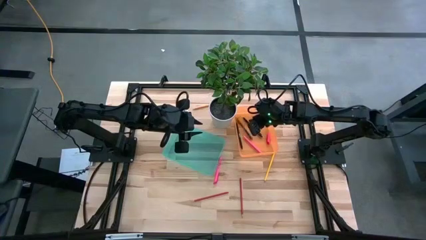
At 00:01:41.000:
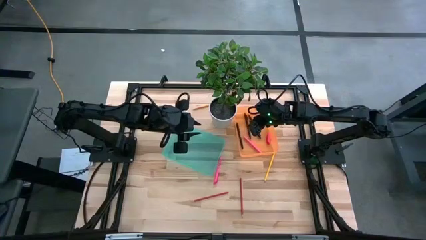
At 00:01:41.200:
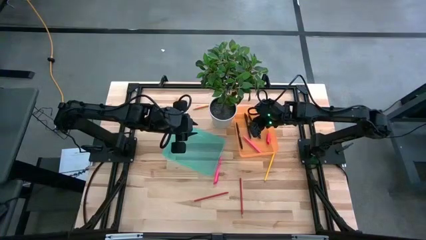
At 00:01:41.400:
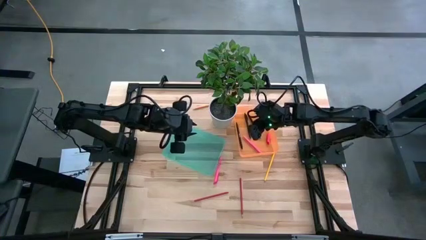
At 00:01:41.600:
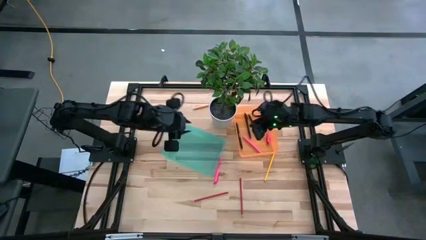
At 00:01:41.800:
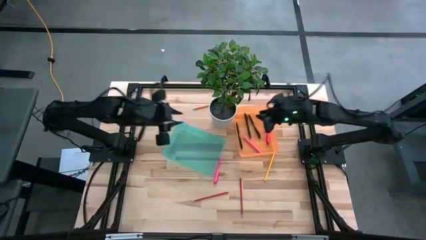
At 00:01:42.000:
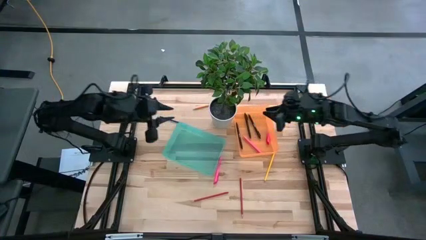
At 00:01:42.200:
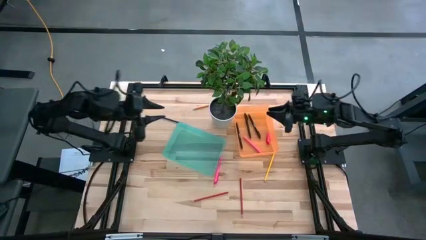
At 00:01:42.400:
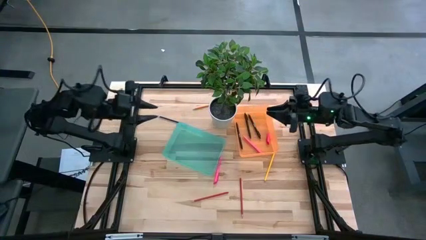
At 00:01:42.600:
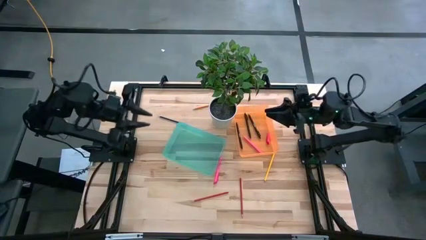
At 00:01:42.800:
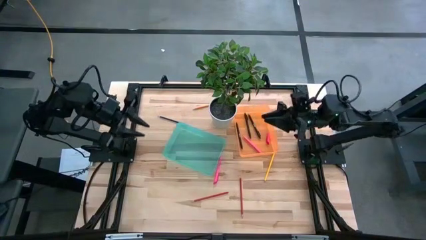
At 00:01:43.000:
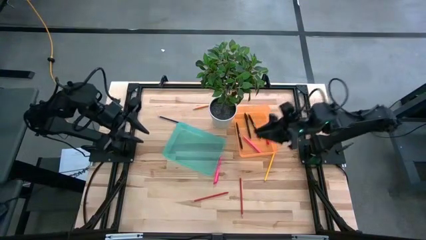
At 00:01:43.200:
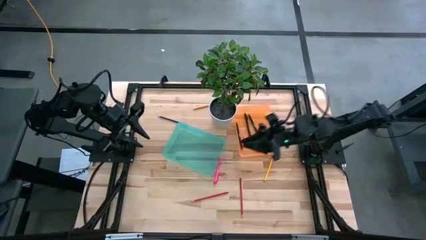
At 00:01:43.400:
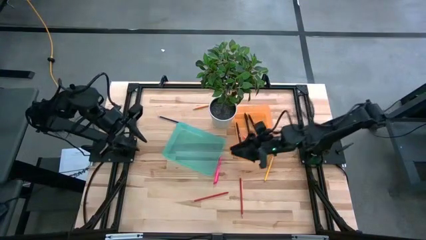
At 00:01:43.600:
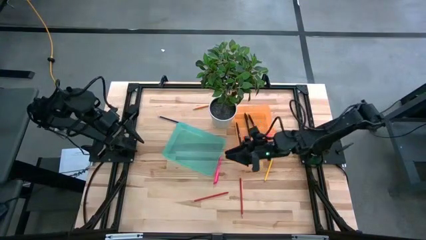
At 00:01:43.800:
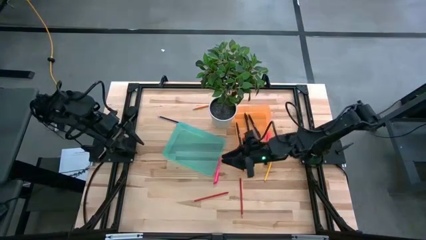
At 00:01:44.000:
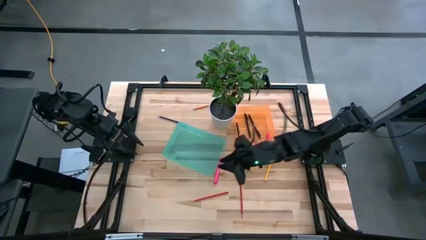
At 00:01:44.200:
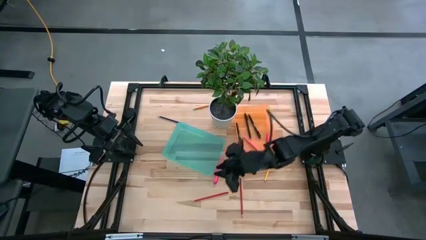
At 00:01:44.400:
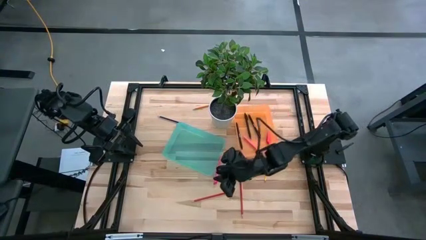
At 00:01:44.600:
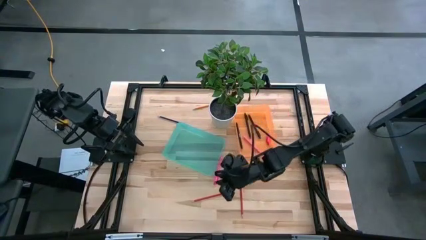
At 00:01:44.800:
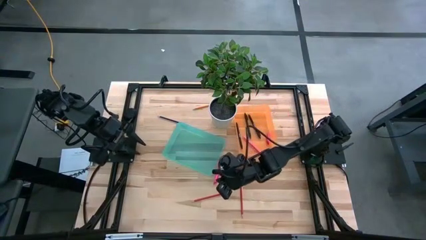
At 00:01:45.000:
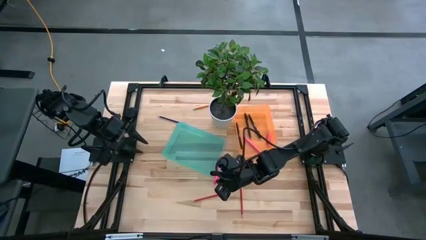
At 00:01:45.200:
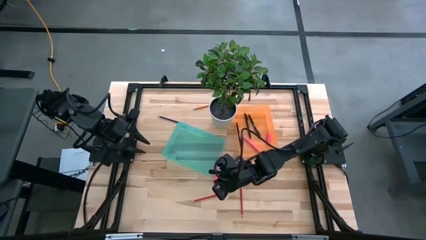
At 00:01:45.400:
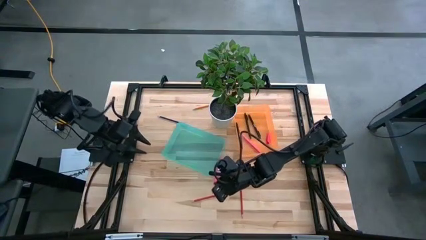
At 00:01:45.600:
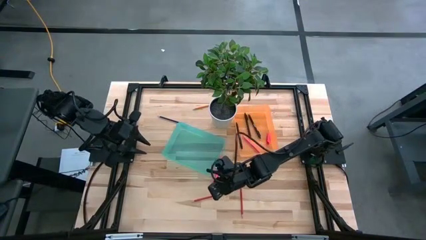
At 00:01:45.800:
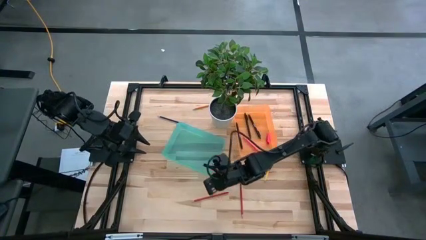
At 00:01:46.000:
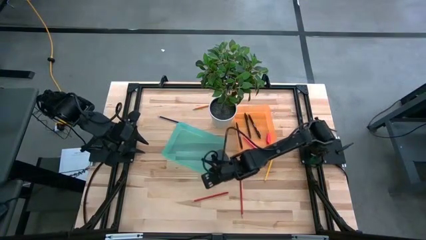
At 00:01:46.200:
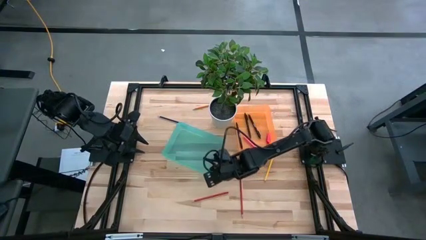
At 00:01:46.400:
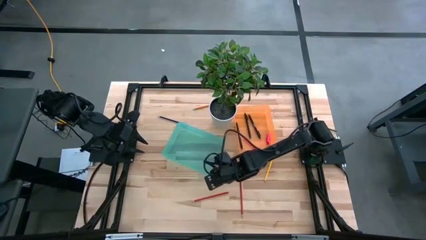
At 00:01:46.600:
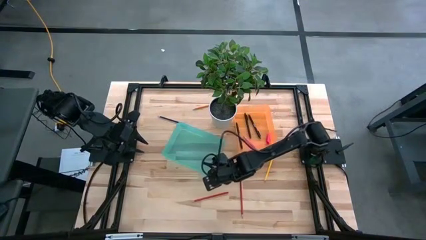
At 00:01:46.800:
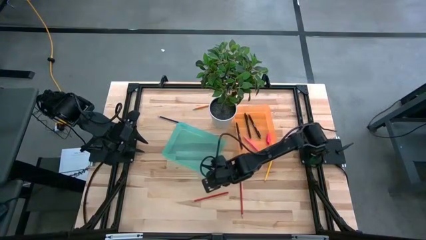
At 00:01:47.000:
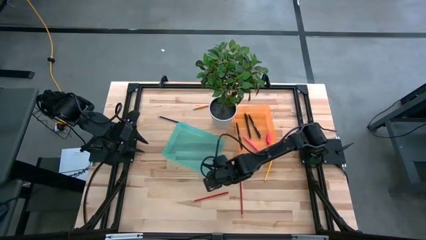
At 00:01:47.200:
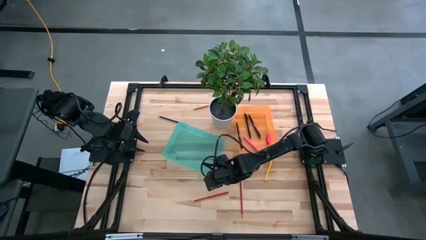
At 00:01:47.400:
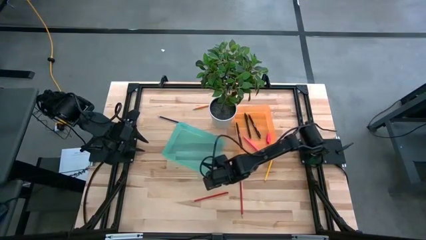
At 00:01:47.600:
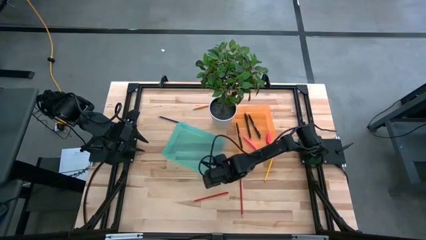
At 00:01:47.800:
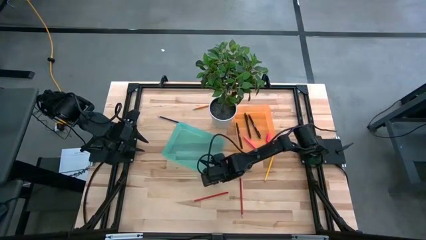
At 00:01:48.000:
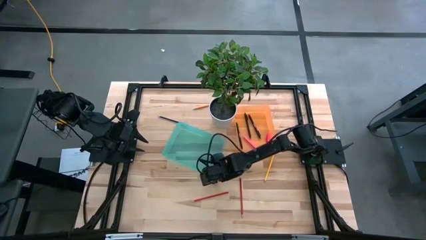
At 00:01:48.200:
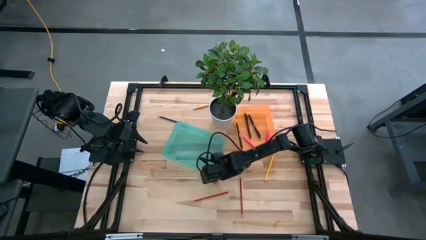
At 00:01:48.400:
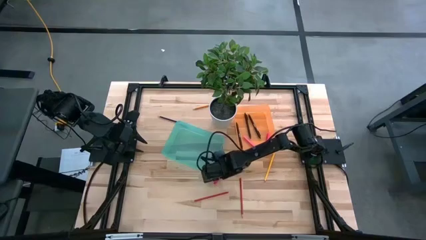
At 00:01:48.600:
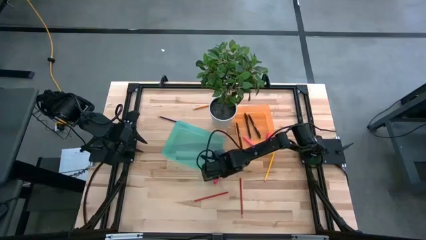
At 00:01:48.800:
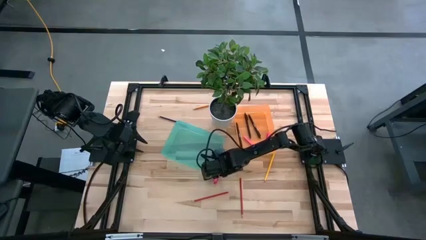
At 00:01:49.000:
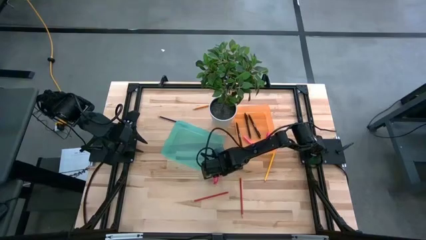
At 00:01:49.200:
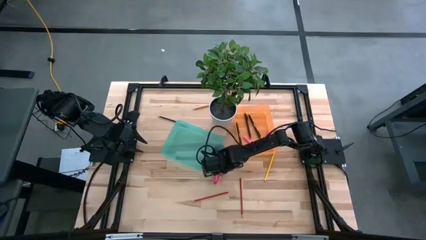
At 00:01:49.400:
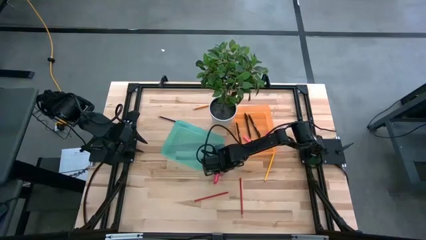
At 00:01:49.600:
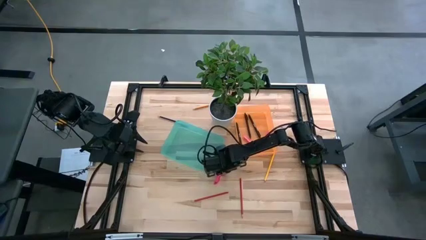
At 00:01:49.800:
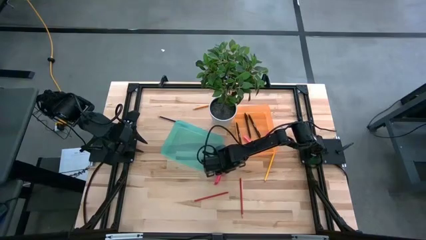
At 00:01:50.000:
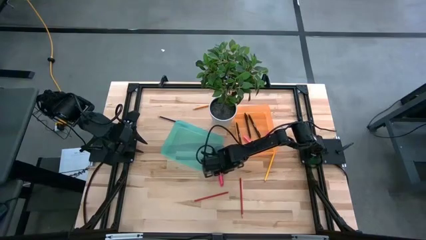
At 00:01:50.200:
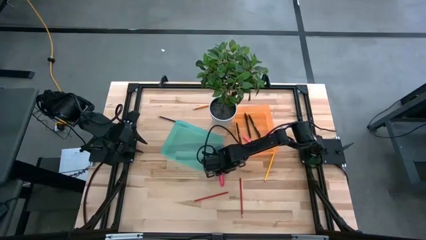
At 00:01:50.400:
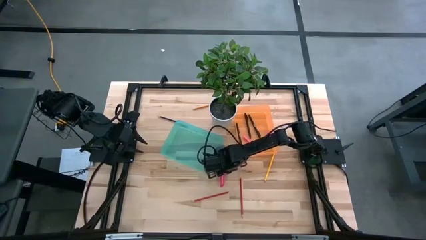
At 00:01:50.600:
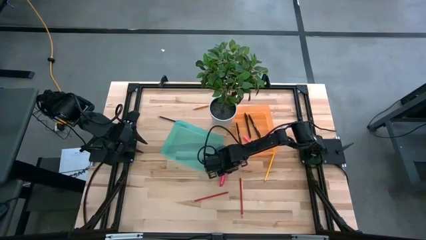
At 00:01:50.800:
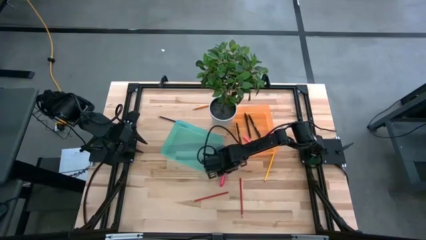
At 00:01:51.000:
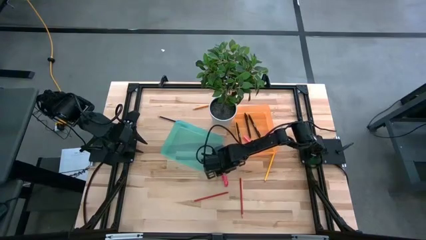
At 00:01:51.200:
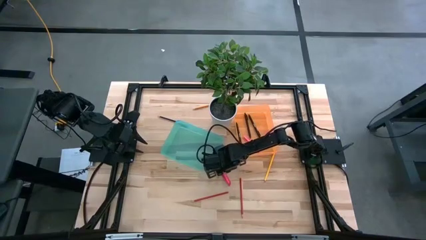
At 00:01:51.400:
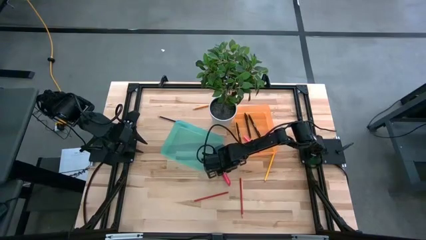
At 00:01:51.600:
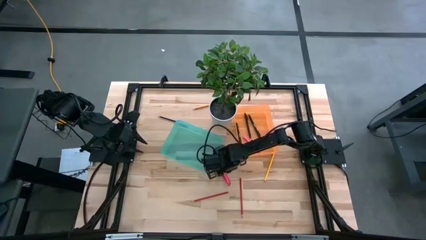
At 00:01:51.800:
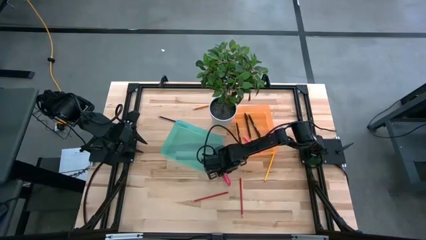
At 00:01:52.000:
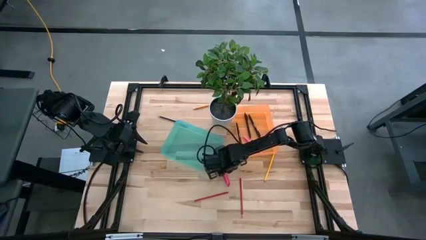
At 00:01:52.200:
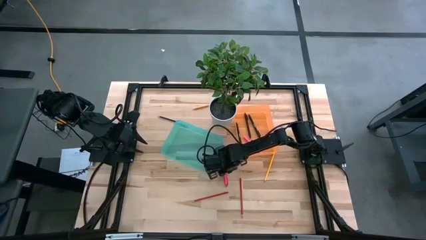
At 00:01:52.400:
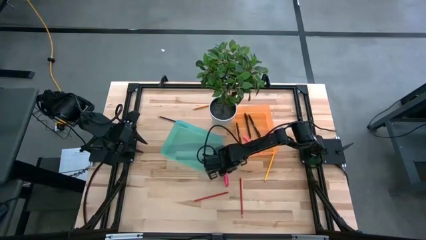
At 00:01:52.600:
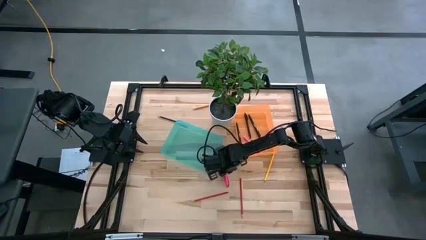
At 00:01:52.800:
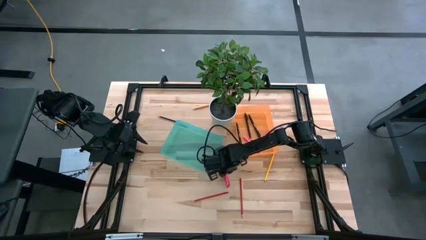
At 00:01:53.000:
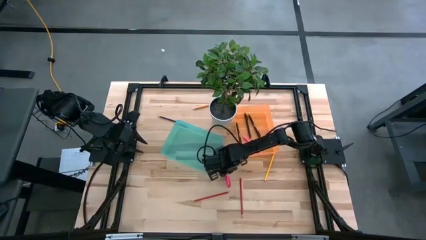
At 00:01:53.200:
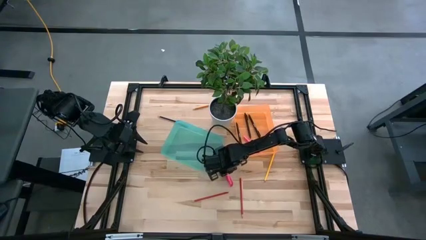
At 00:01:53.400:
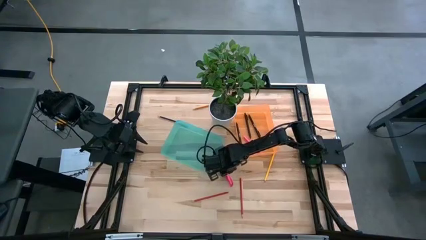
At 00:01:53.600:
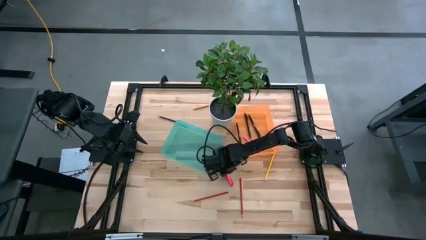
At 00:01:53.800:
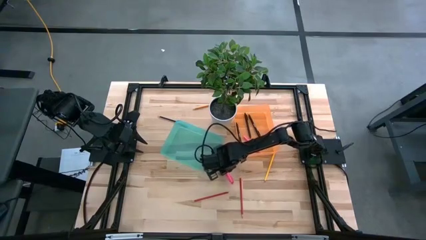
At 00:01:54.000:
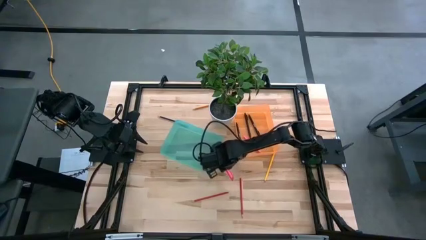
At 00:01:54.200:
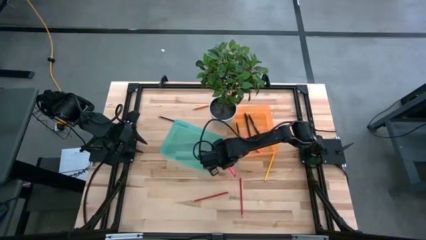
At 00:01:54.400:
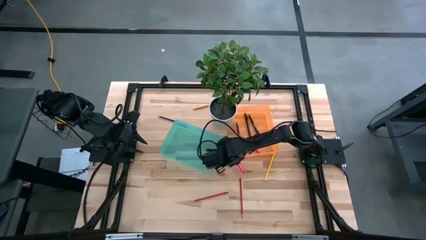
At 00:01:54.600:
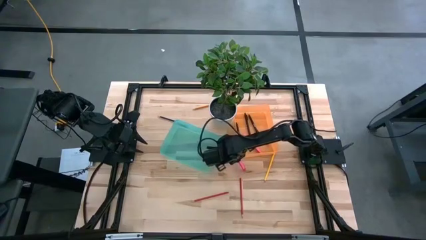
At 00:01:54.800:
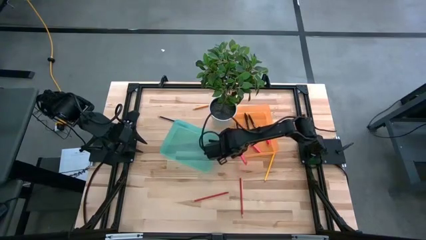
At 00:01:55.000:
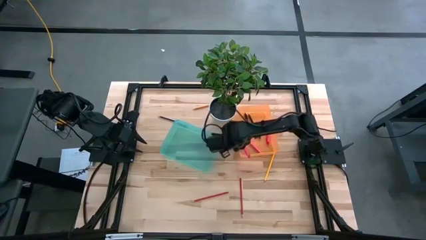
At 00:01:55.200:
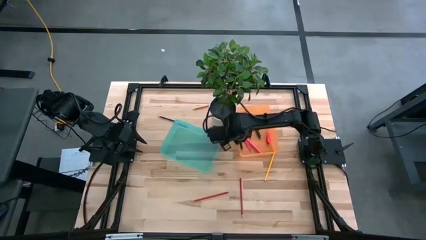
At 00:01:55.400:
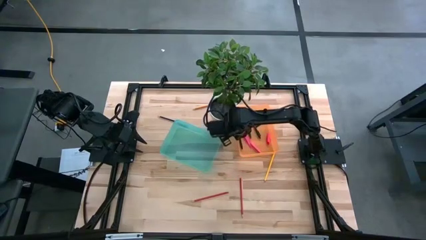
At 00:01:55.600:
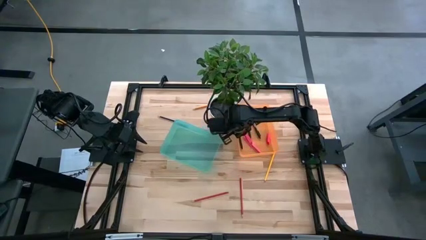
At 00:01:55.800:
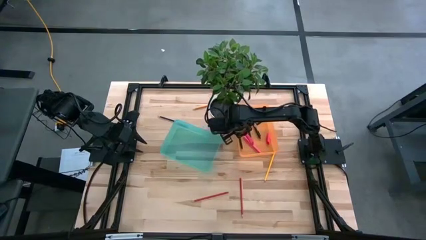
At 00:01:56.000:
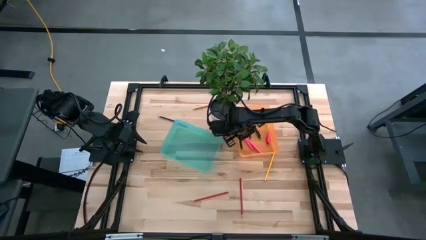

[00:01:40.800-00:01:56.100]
Task: Sort pens & pencils
Put the pink pen into the orange bin
